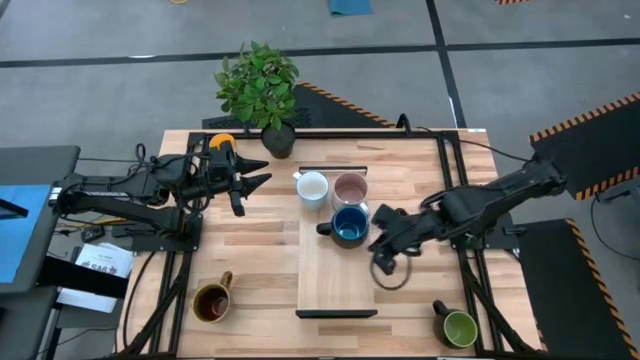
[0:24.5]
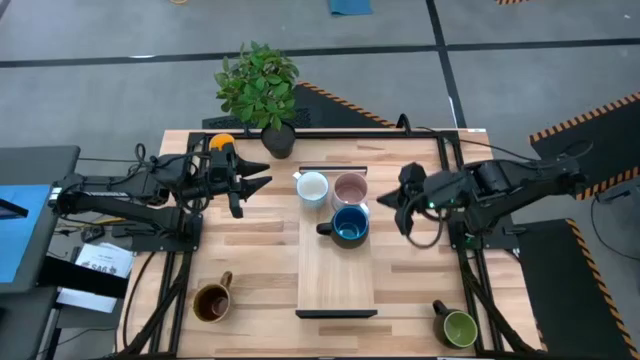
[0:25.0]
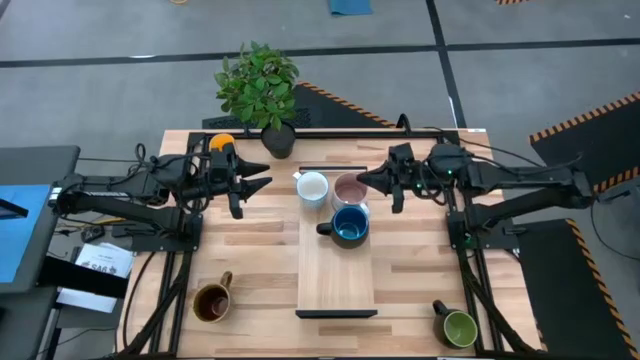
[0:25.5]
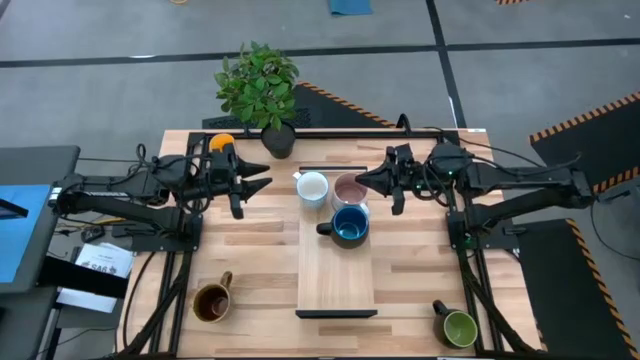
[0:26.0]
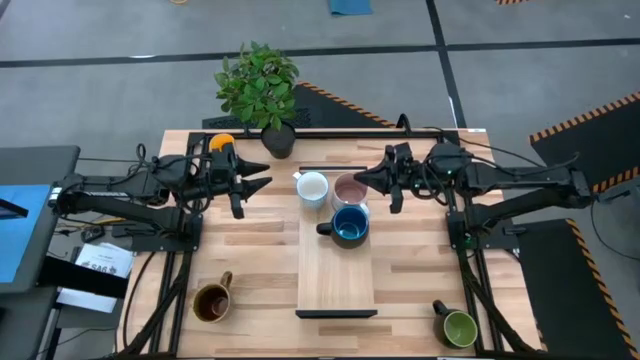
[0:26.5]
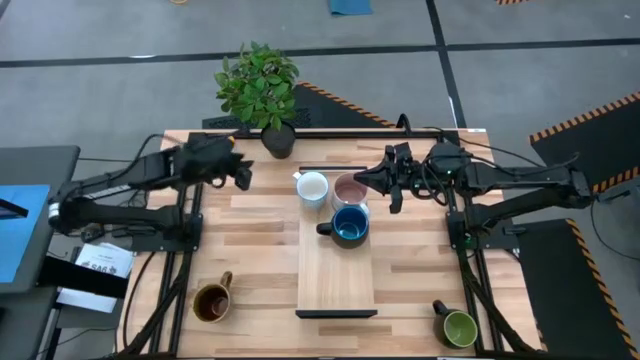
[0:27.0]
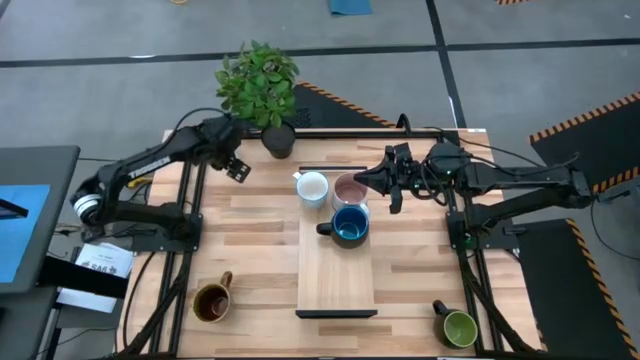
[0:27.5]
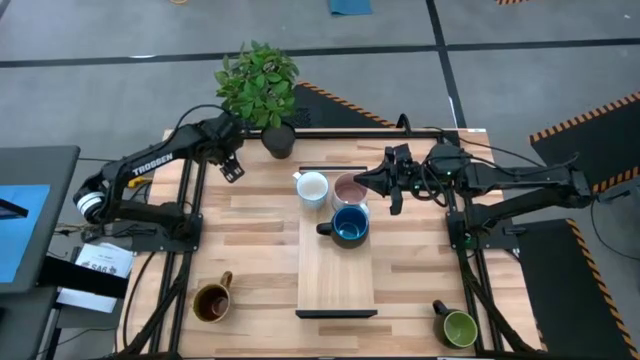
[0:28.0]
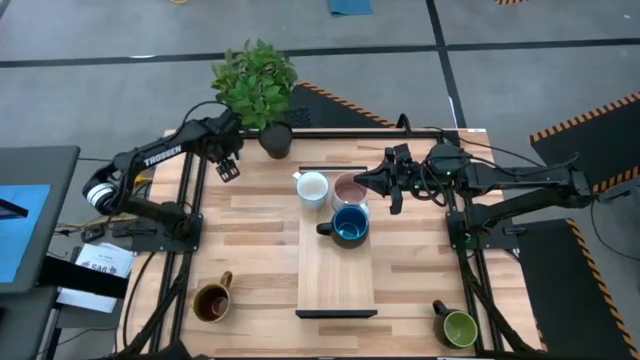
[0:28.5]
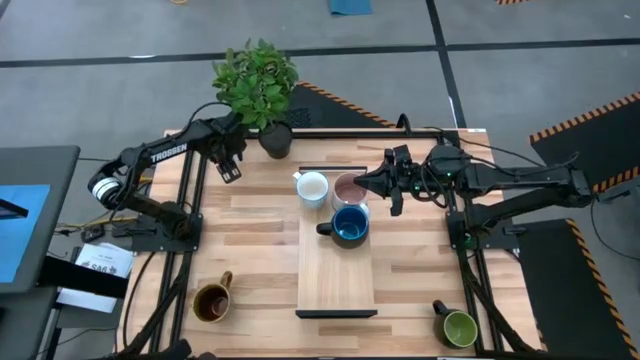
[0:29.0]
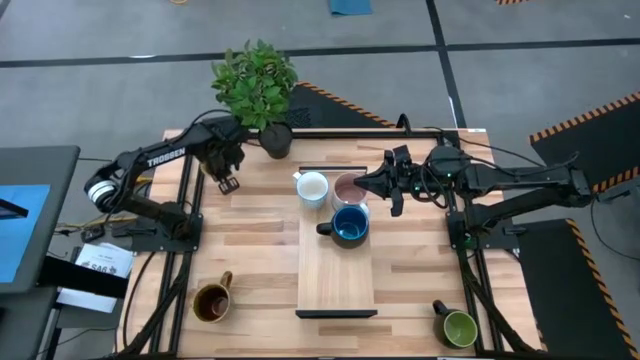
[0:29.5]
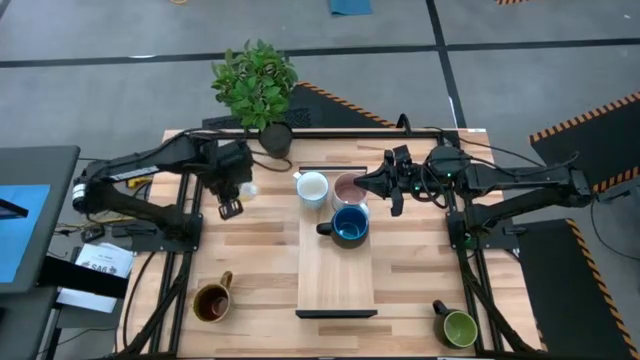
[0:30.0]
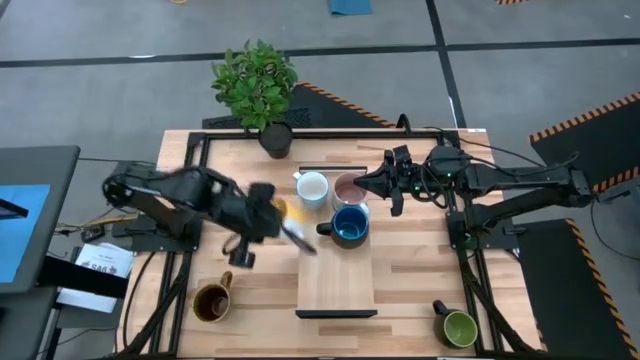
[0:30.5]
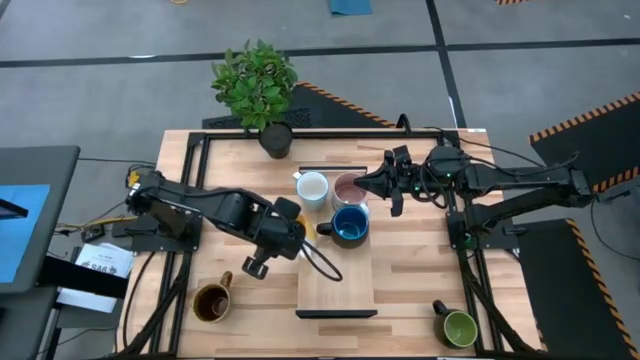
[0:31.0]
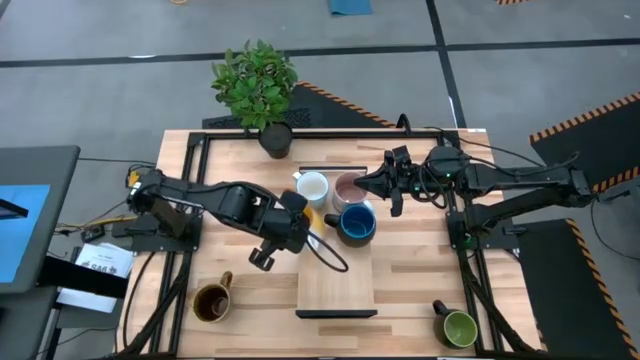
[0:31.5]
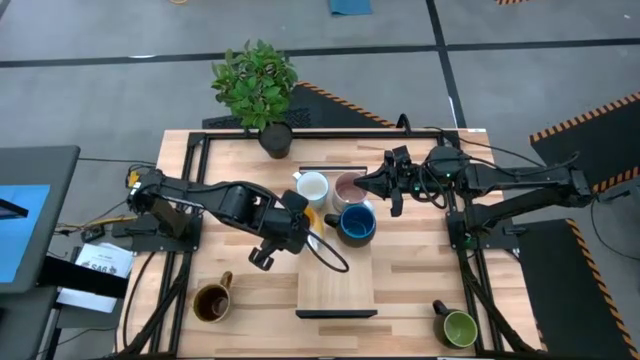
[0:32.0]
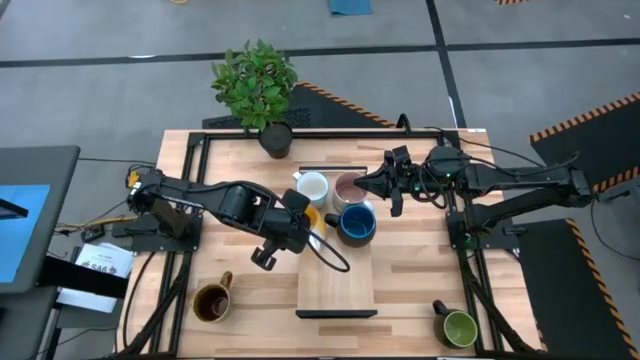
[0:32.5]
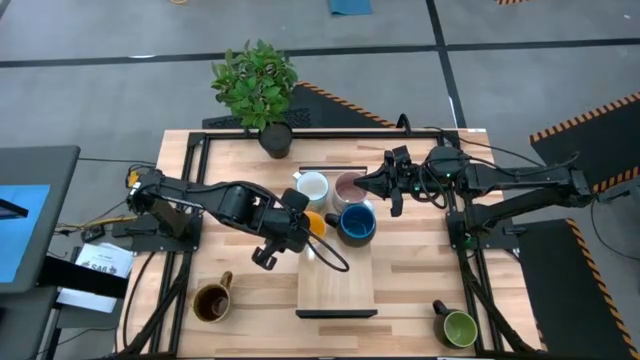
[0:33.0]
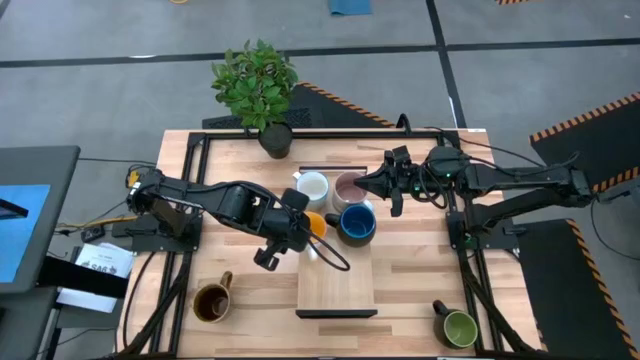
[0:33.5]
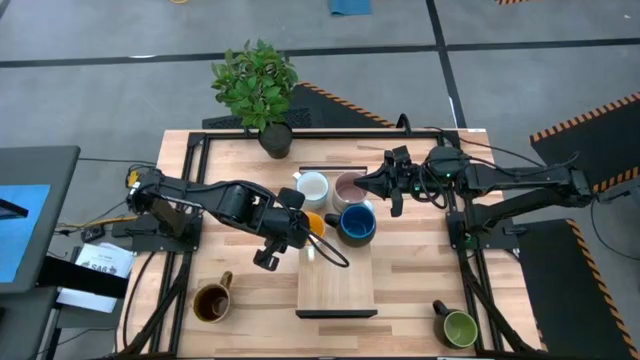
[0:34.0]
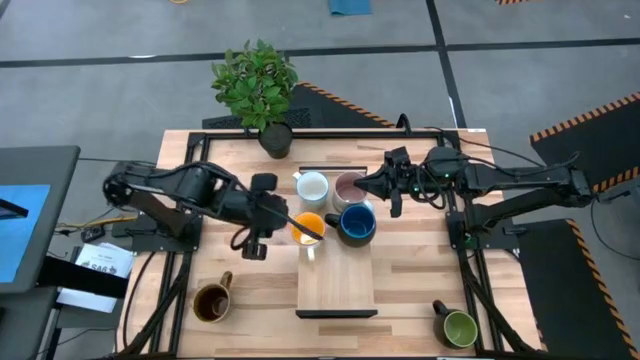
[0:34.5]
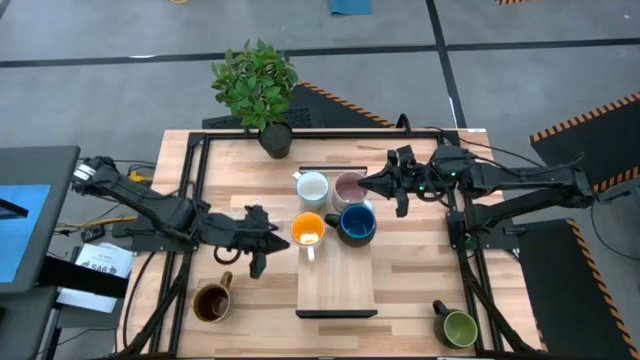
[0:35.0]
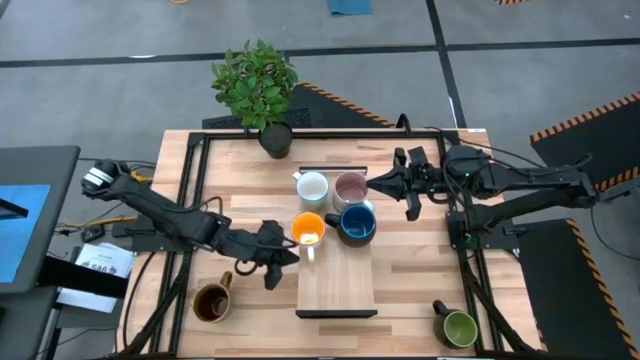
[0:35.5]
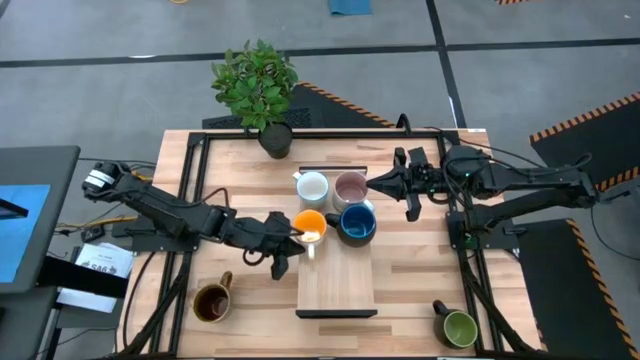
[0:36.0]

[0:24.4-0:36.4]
Task: Place coffee mugs
Put the yellow mug on the shelf

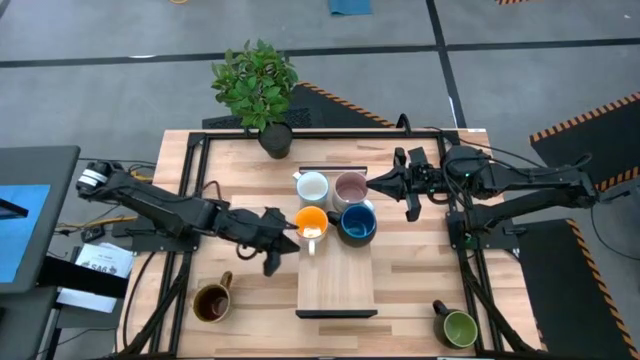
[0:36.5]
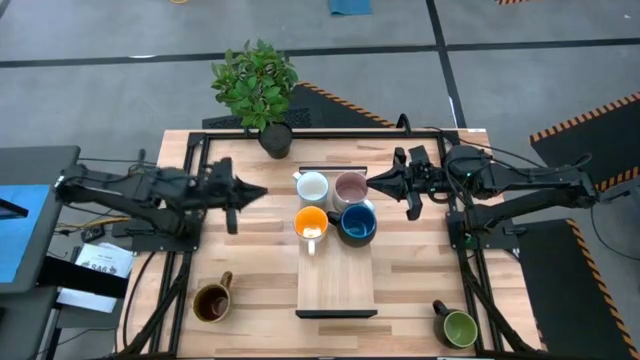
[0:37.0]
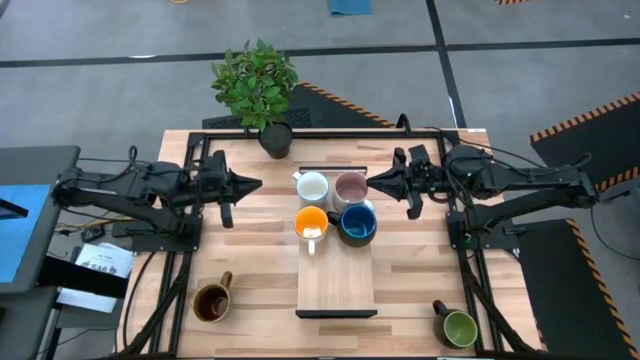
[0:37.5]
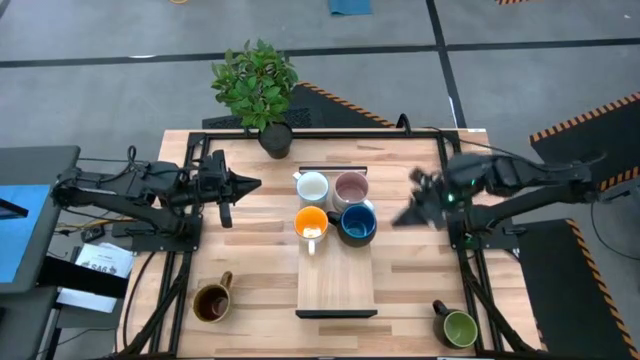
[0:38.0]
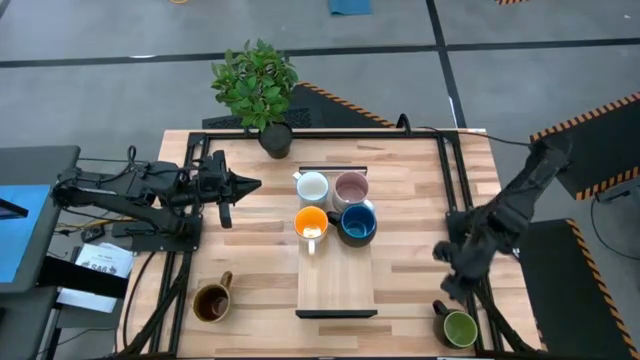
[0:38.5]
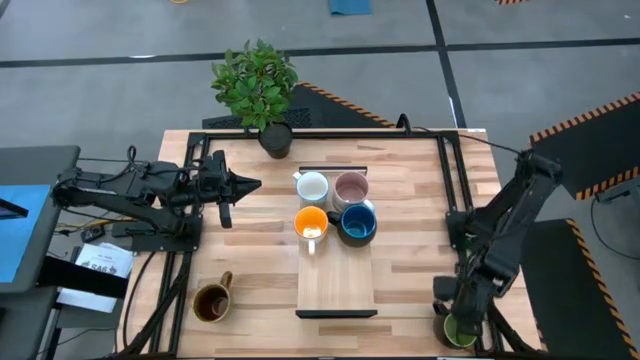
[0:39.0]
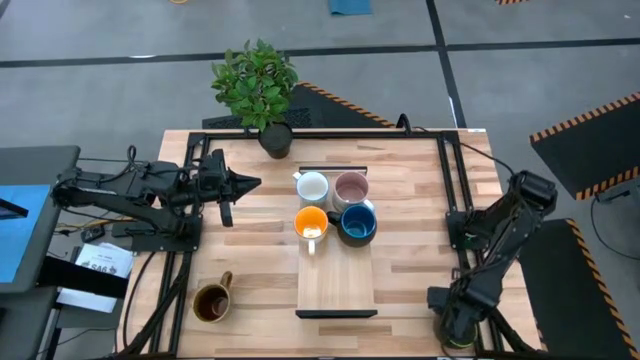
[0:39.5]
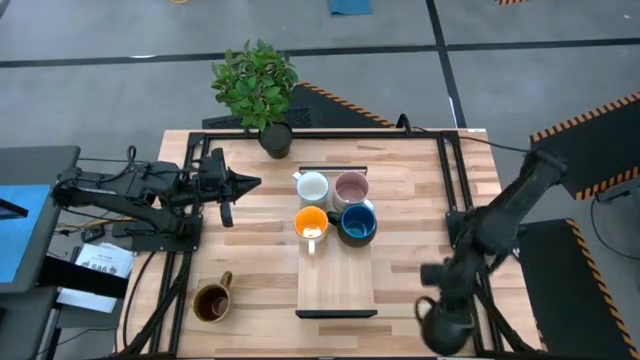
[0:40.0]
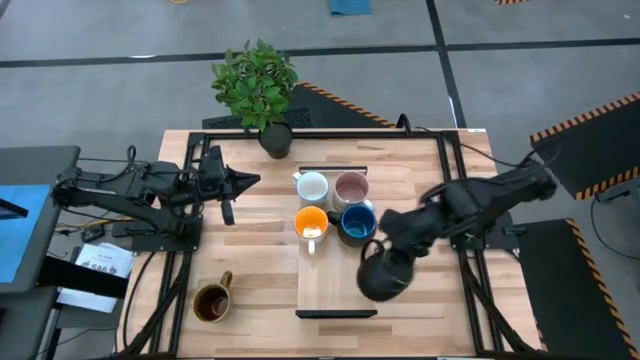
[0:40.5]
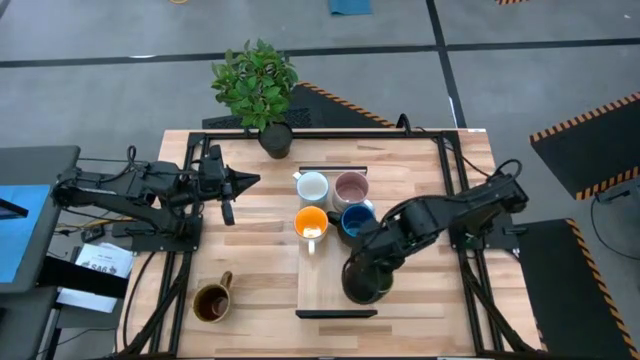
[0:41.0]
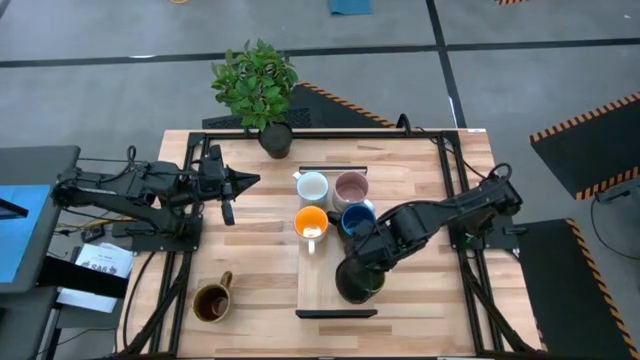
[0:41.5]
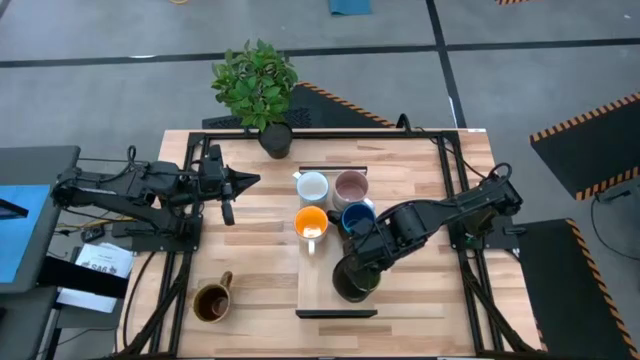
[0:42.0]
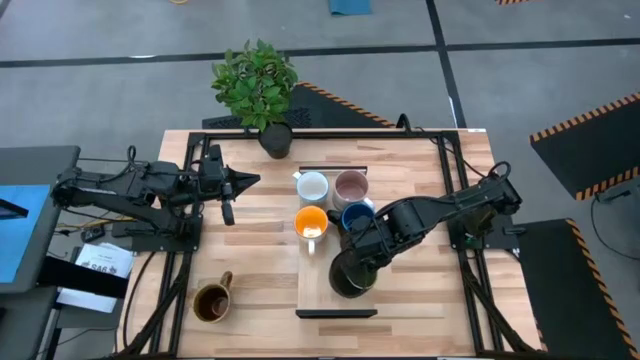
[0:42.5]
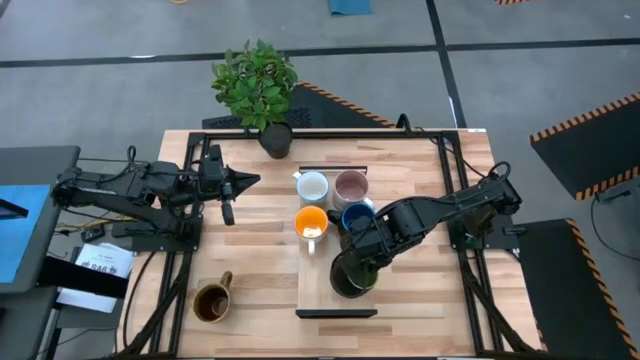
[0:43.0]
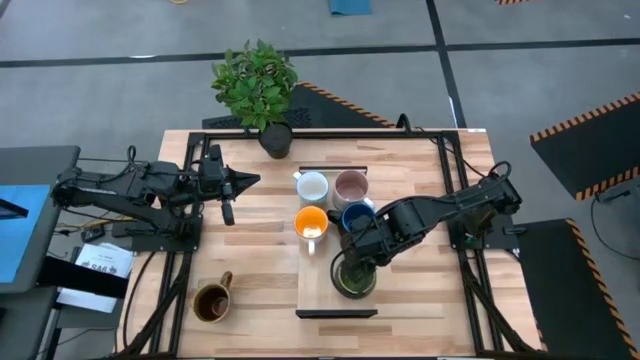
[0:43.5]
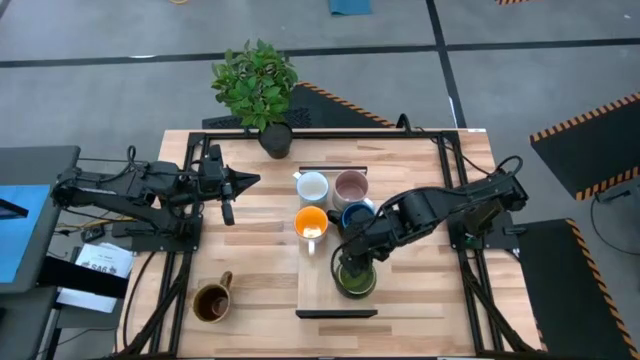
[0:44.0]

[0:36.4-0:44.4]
Put the green mug on the shelf
